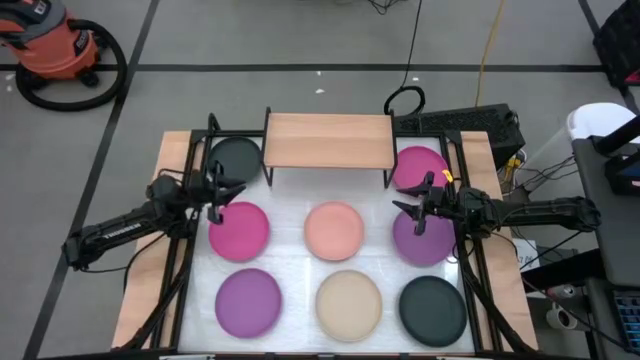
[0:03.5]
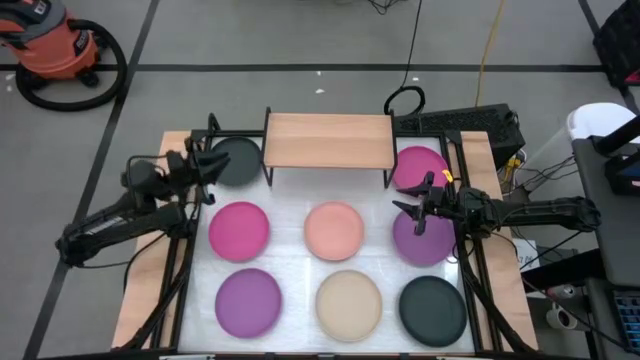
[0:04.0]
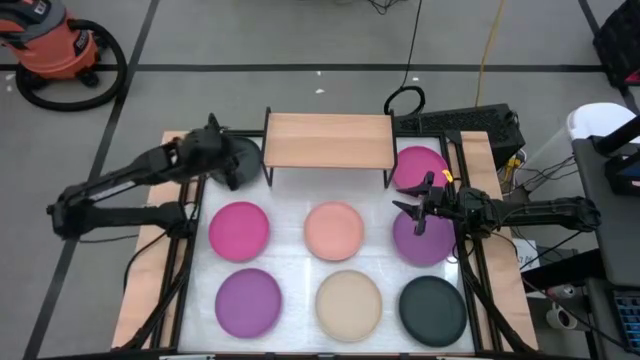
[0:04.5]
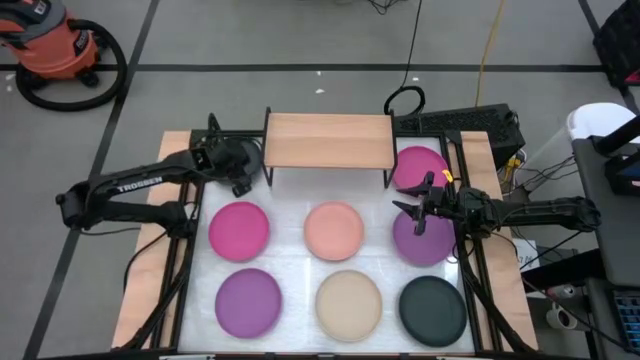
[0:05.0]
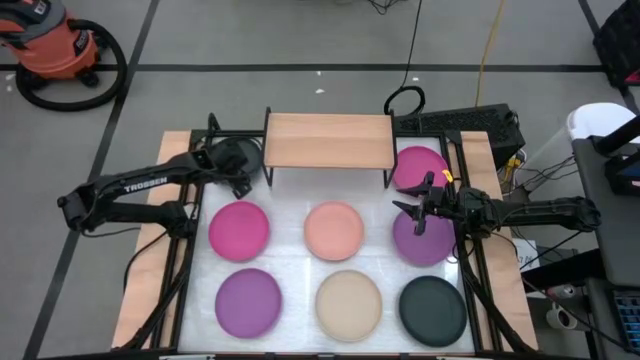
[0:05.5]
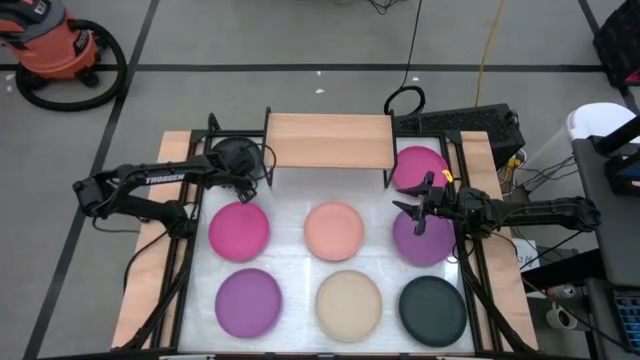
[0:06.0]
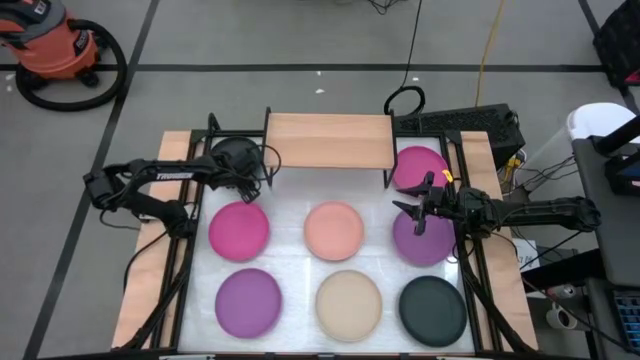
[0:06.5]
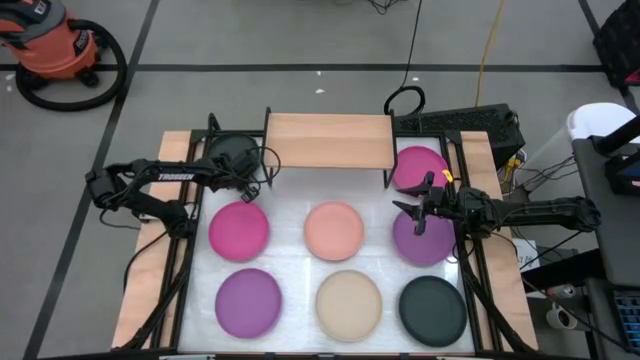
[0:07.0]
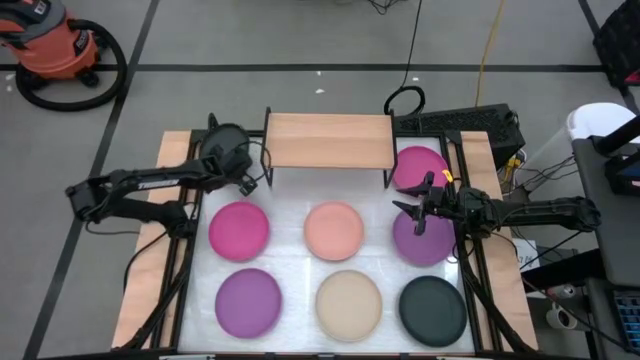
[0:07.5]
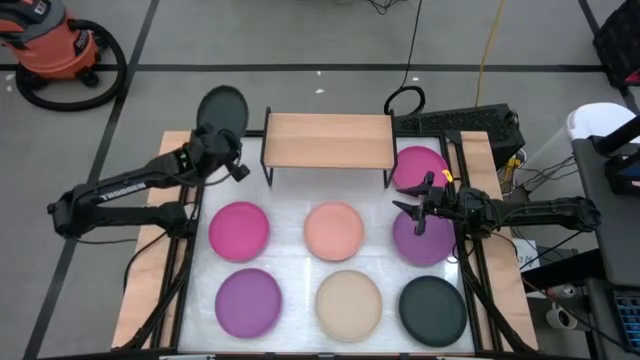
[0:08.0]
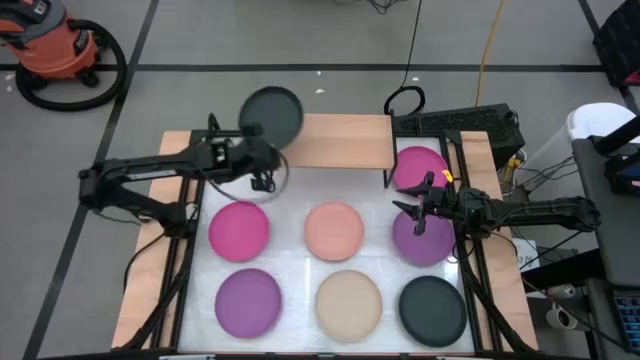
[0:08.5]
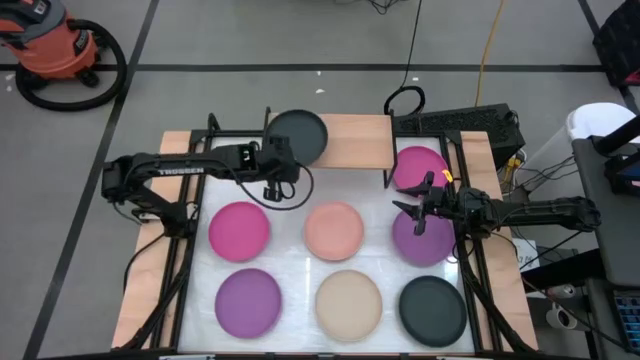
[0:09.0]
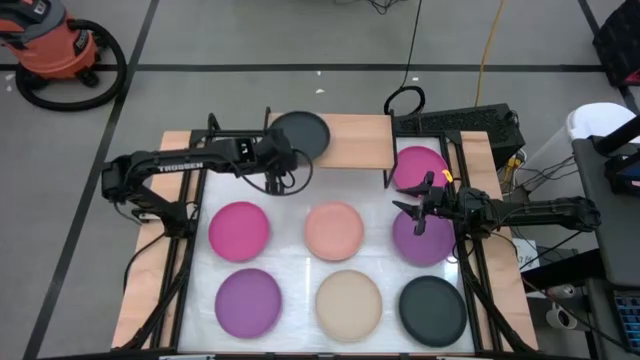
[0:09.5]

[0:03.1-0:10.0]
Task: Place and stack plates onto a shelf
Put the top black plate on the shelf

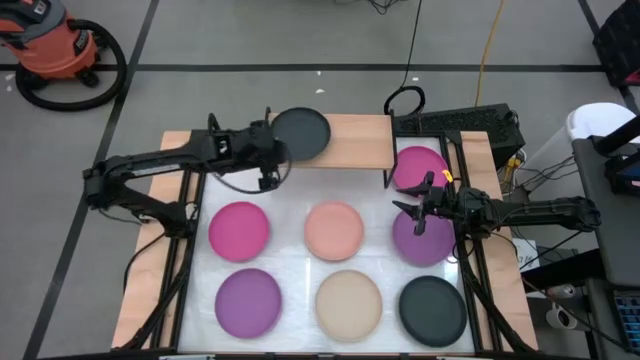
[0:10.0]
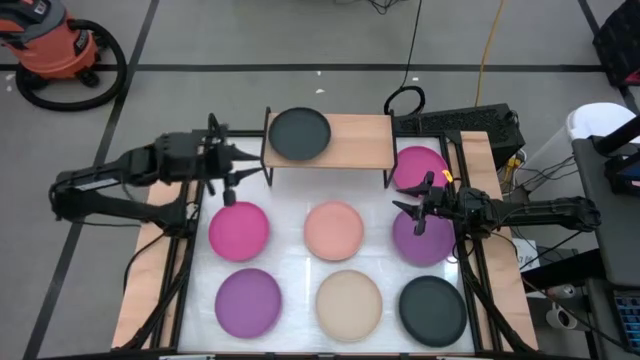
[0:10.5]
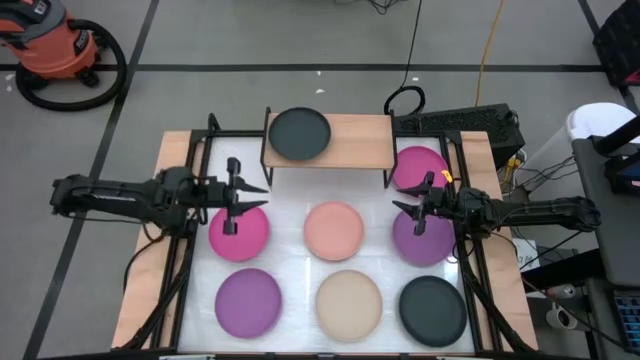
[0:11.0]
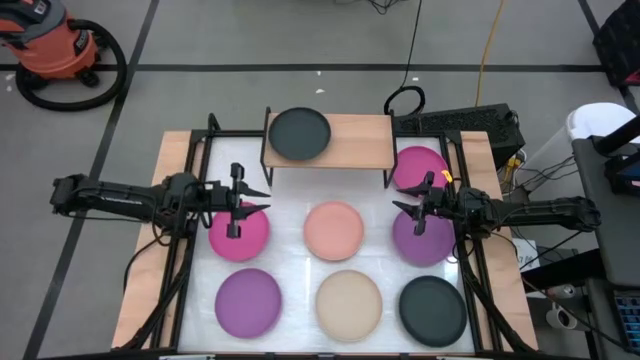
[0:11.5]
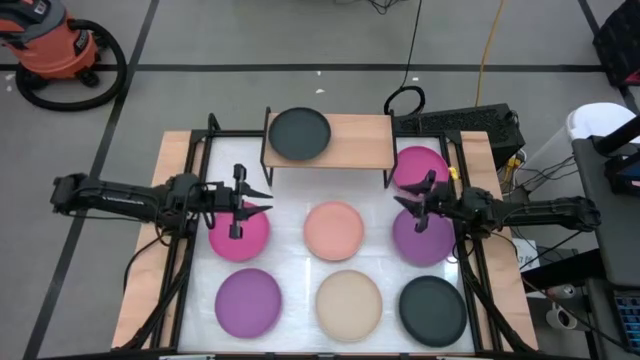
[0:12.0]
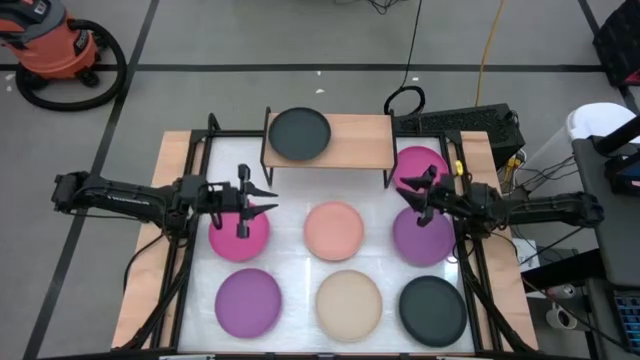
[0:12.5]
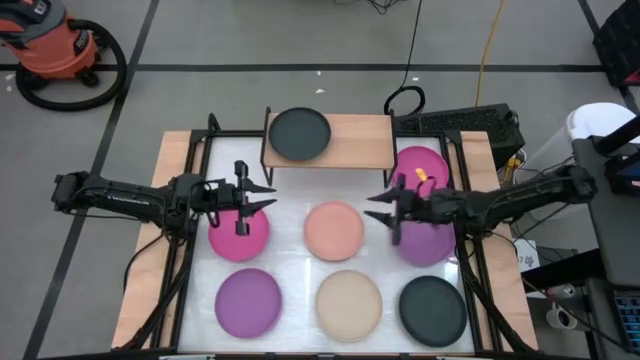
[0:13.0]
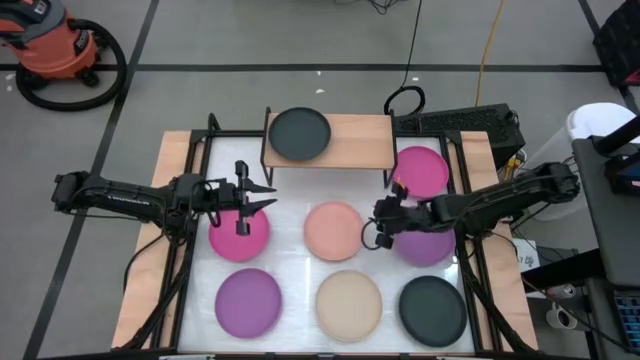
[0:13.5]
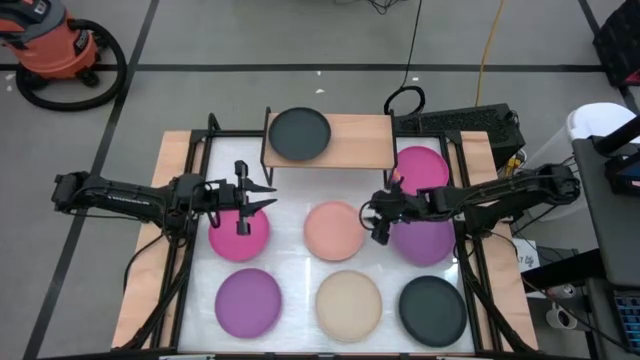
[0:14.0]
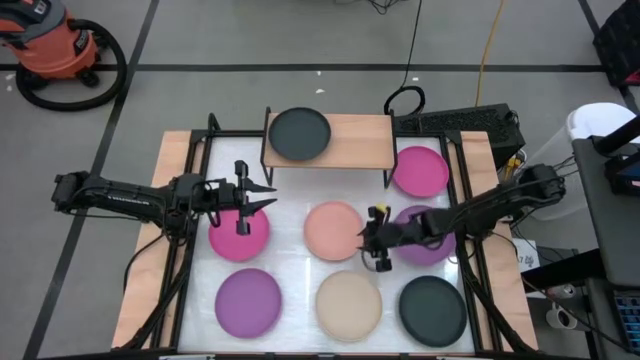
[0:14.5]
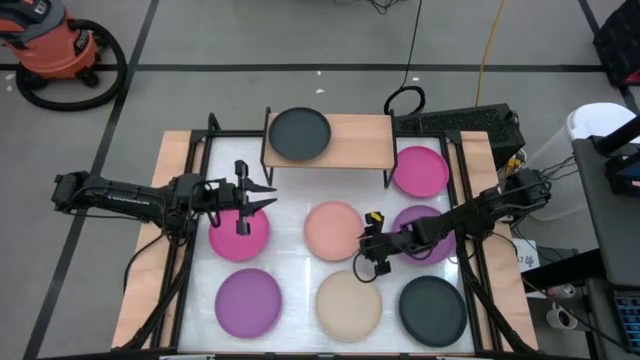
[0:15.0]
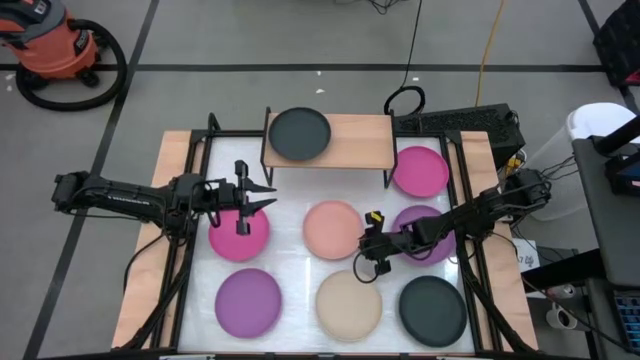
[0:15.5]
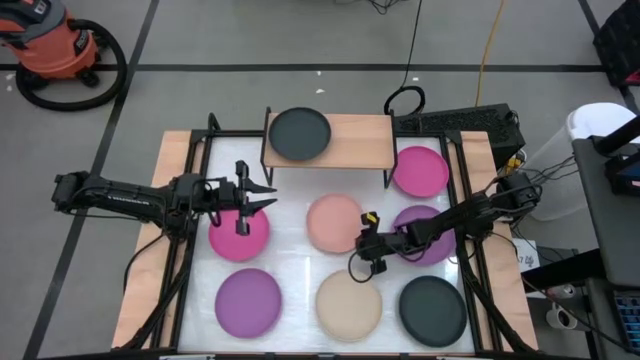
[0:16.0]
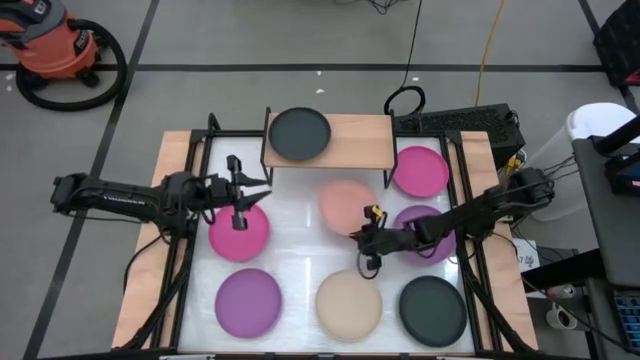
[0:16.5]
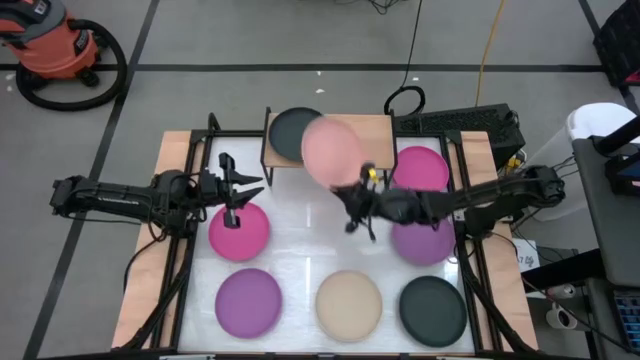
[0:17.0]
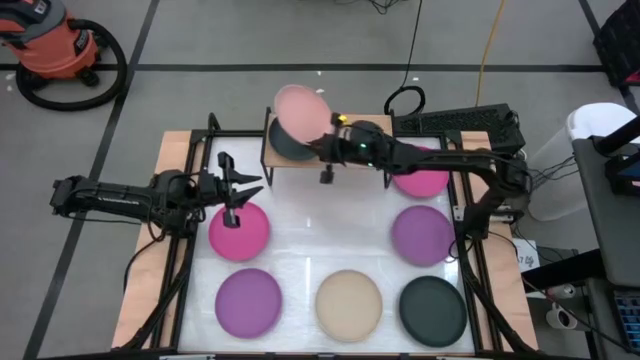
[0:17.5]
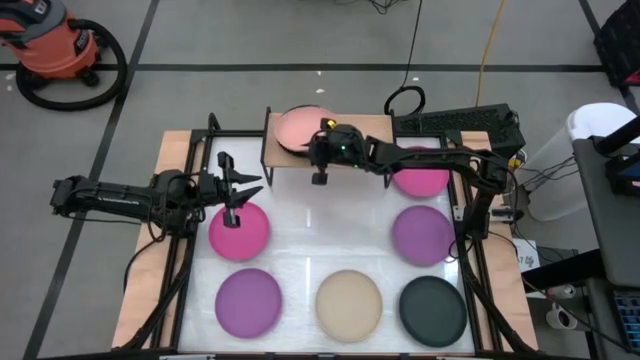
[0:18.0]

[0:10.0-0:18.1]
Stack the light pink plate on top of the black plate on the shelf

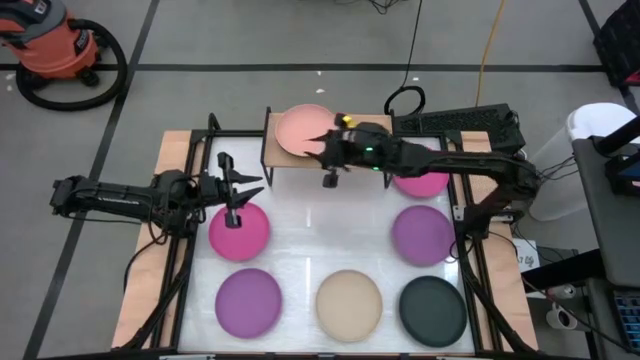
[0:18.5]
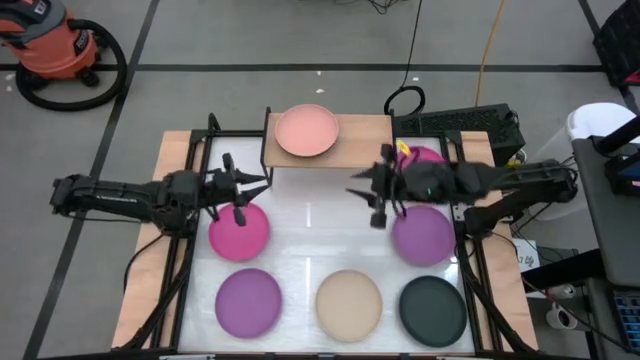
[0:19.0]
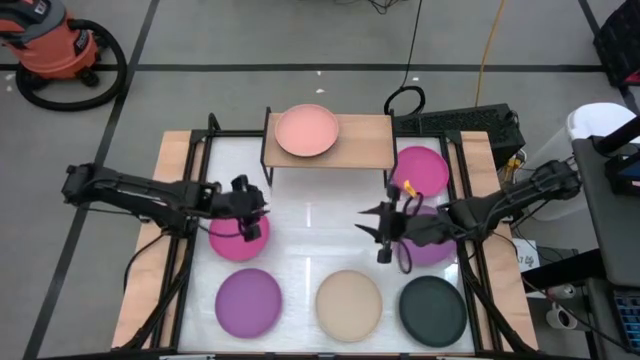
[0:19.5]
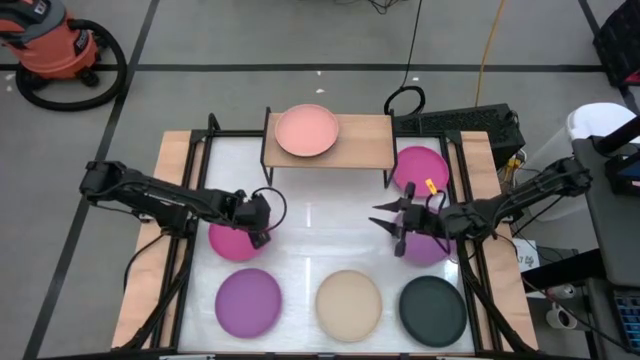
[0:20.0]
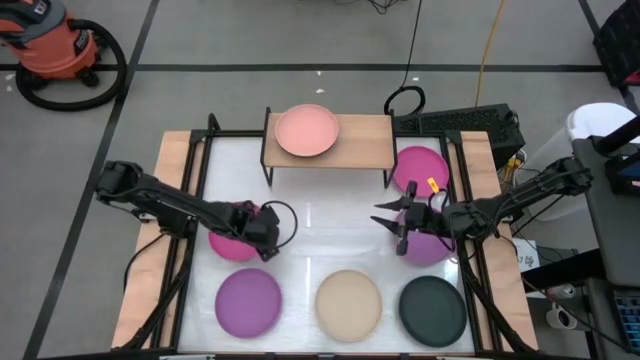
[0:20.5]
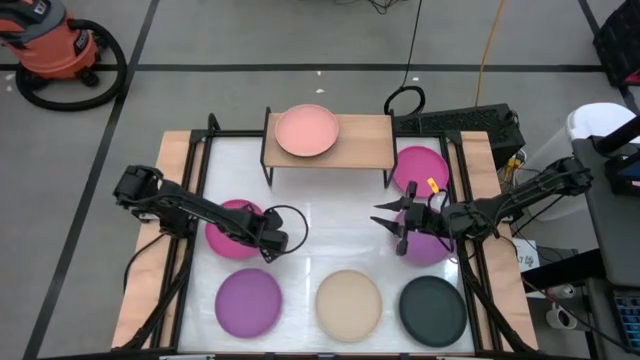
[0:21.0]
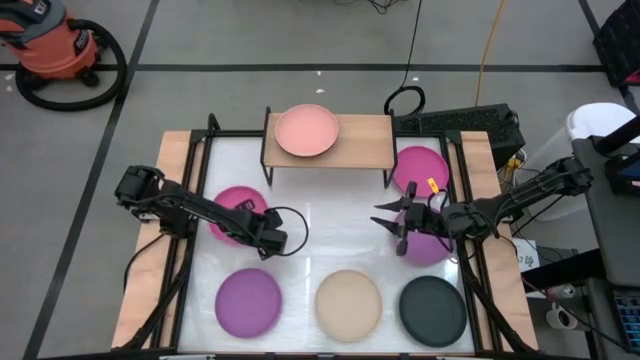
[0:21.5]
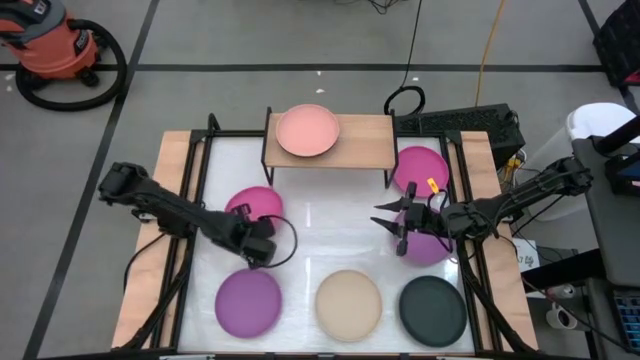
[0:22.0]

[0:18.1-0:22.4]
Stack the bottom pink plate on top of the light pink plate on the shelf

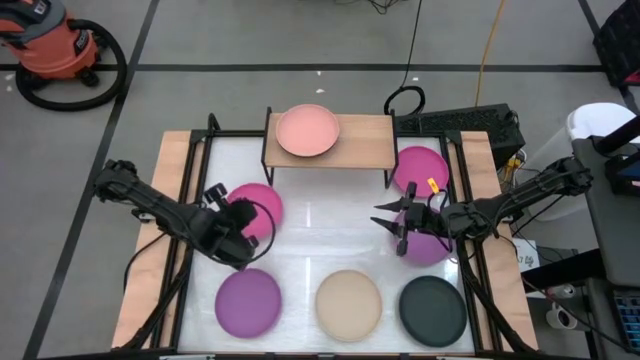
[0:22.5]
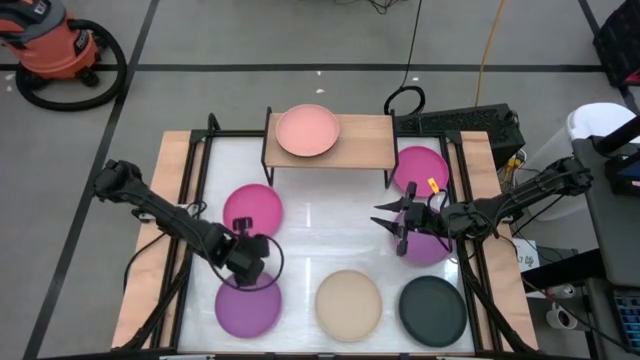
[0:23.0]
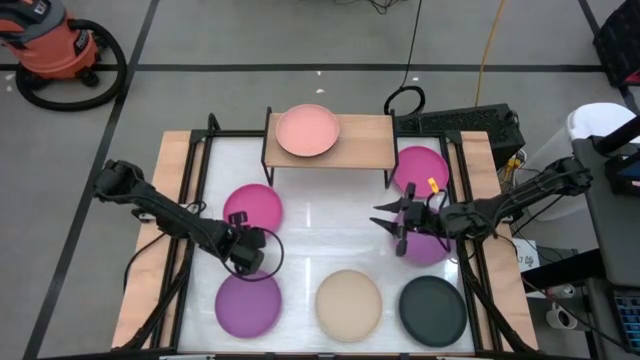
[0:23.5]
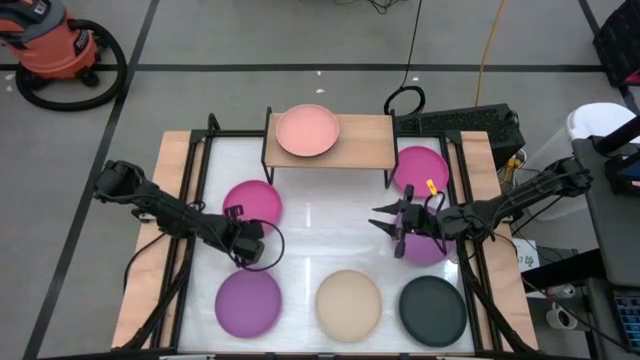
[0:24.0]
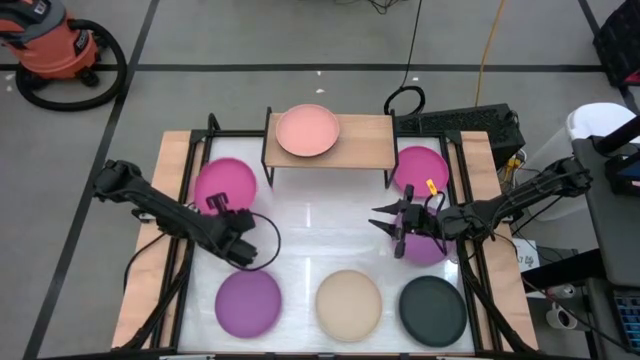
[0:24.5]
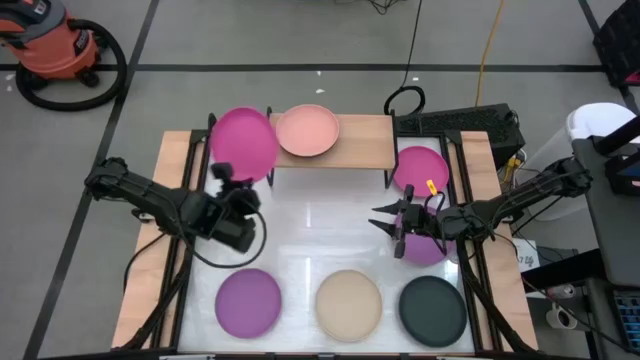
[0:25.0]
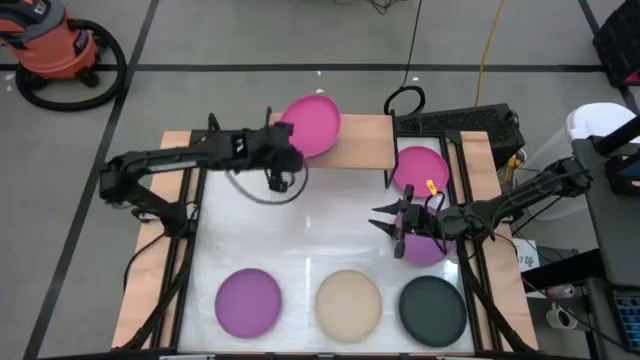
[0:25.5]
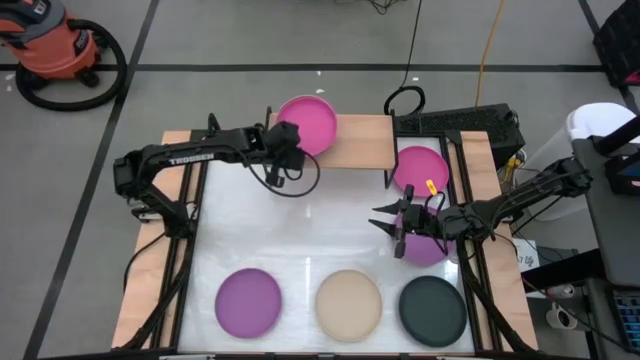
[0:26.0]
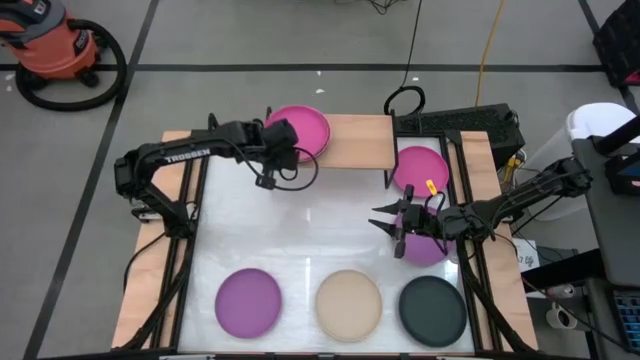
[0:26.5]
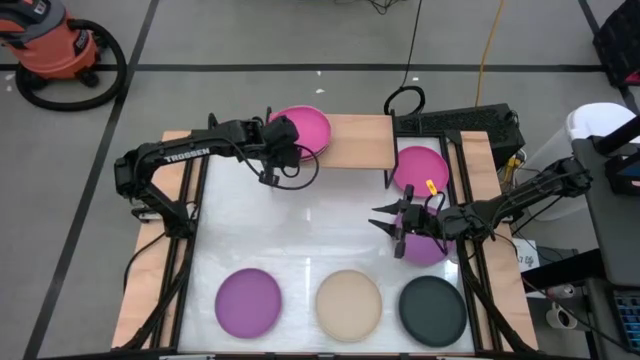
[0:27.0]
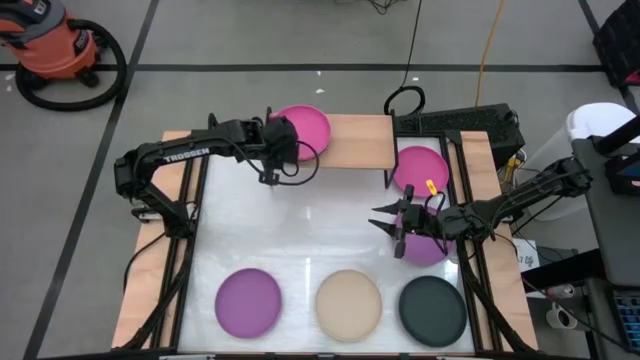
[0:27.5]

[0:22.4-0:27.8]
Stack the bottom pink plate on top of the light pink plate on the shelf
